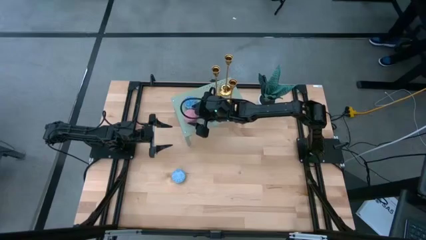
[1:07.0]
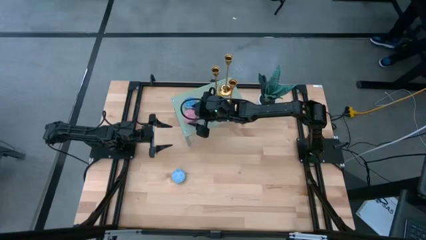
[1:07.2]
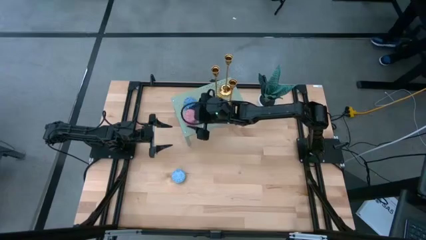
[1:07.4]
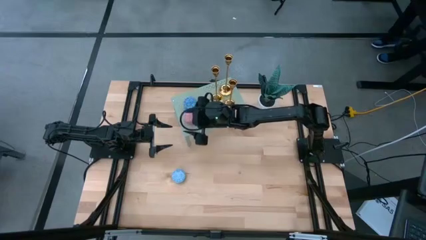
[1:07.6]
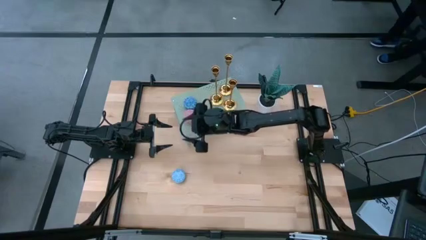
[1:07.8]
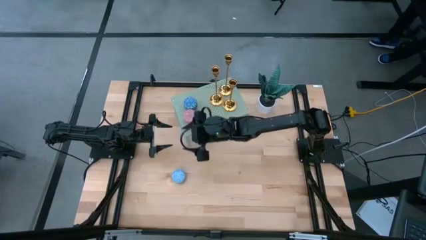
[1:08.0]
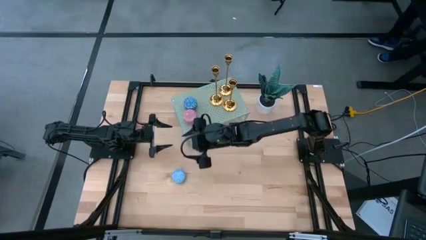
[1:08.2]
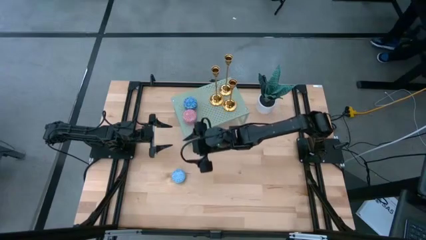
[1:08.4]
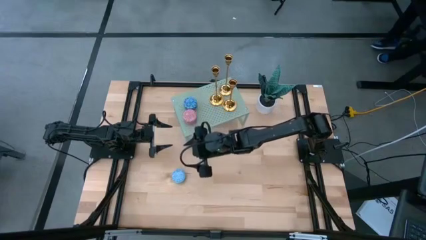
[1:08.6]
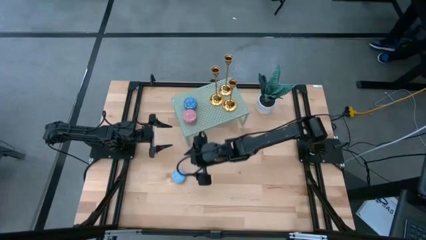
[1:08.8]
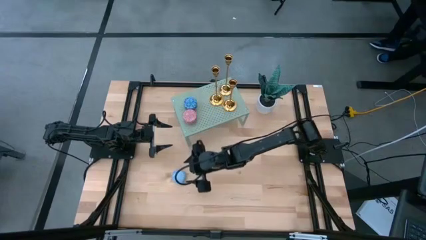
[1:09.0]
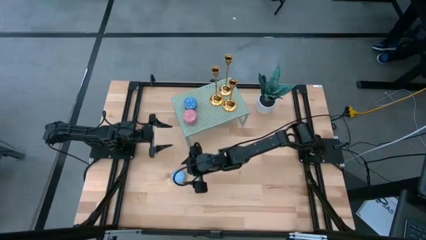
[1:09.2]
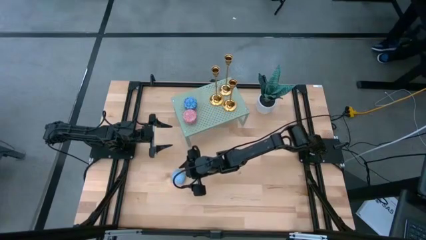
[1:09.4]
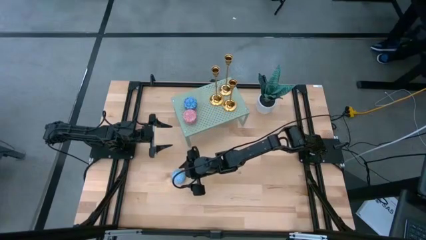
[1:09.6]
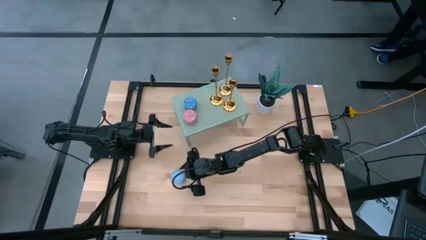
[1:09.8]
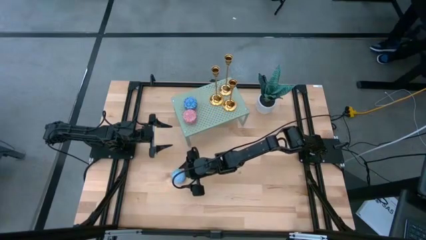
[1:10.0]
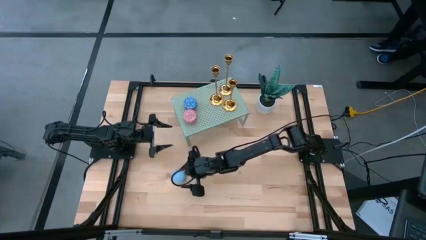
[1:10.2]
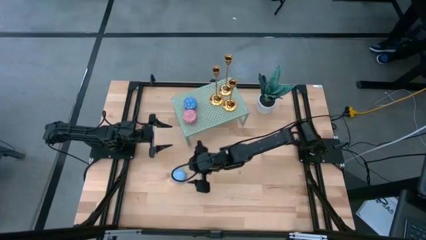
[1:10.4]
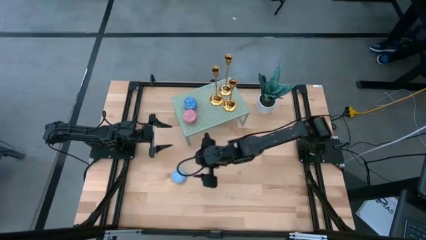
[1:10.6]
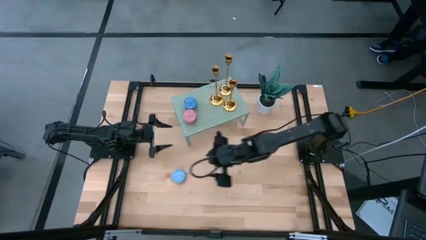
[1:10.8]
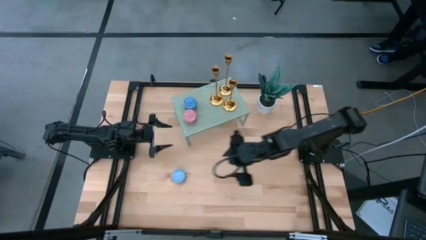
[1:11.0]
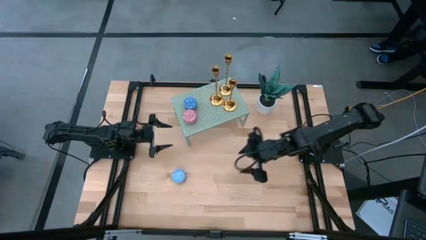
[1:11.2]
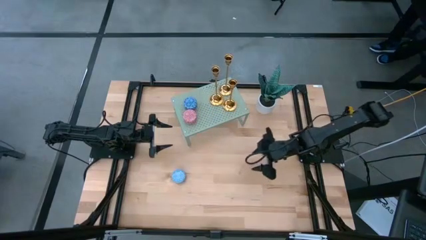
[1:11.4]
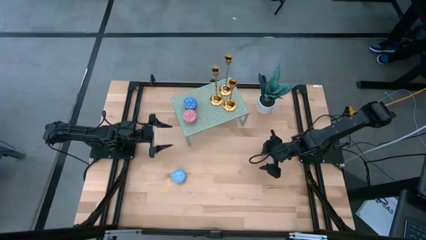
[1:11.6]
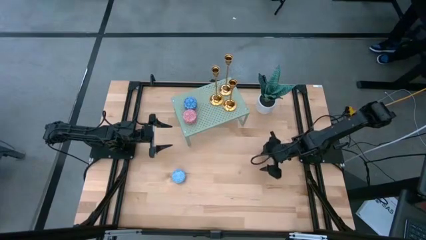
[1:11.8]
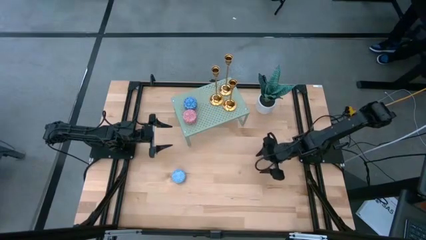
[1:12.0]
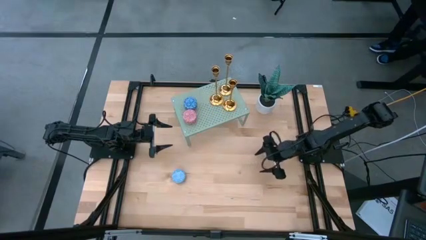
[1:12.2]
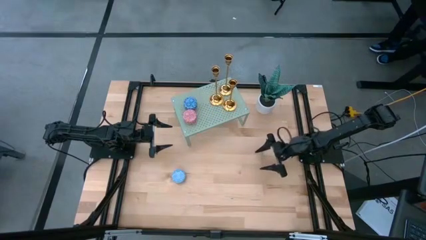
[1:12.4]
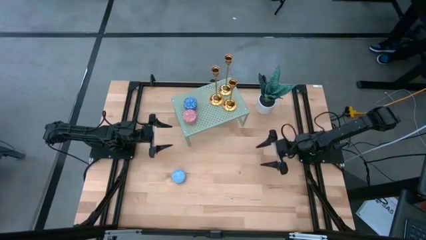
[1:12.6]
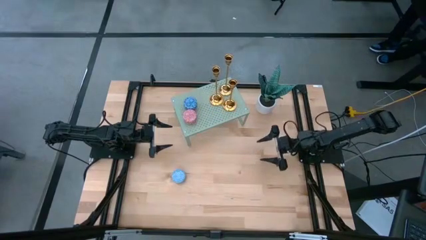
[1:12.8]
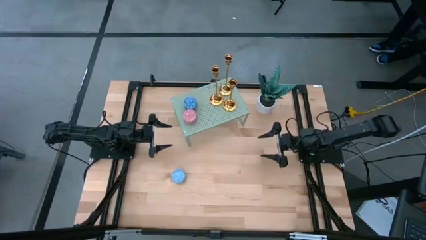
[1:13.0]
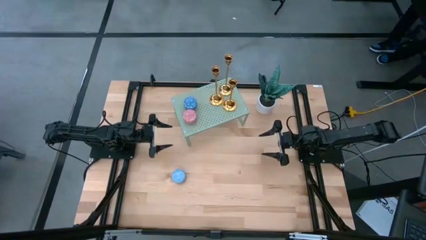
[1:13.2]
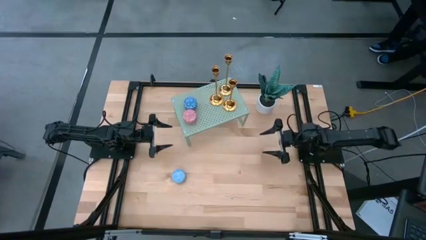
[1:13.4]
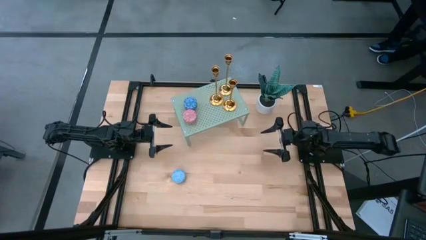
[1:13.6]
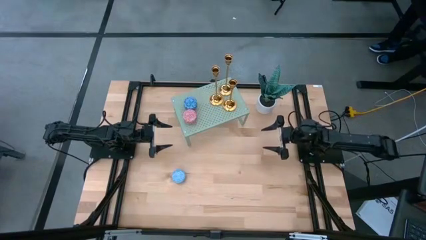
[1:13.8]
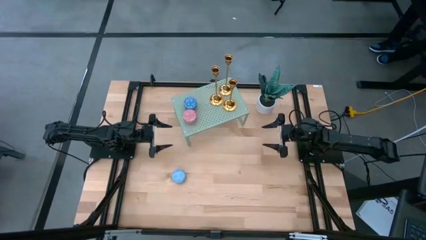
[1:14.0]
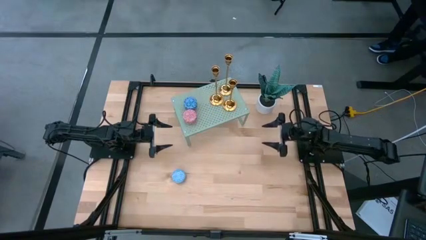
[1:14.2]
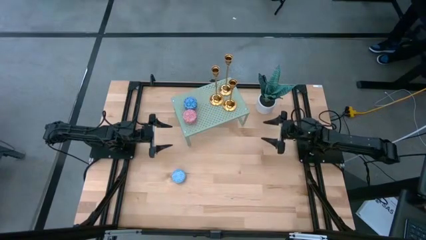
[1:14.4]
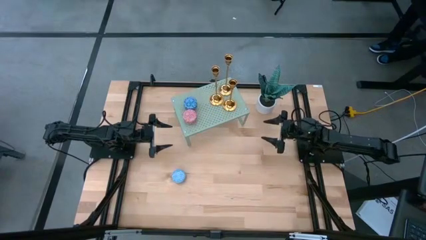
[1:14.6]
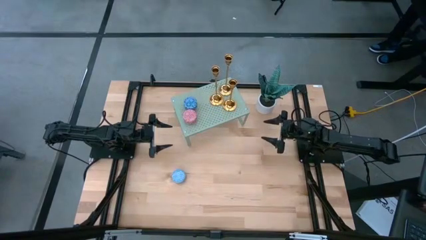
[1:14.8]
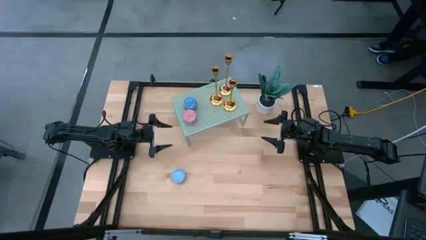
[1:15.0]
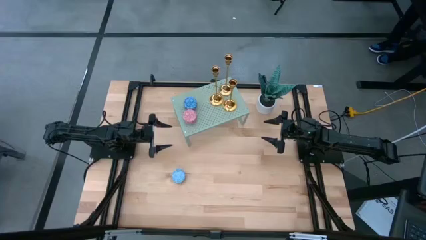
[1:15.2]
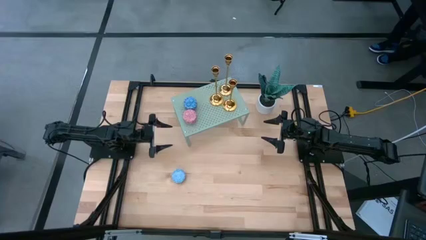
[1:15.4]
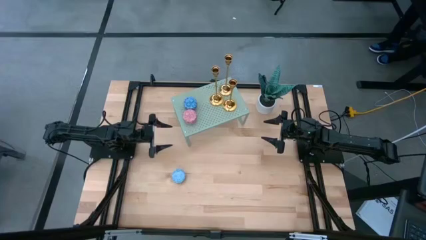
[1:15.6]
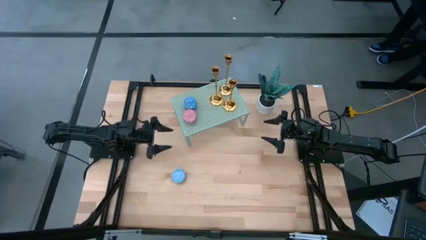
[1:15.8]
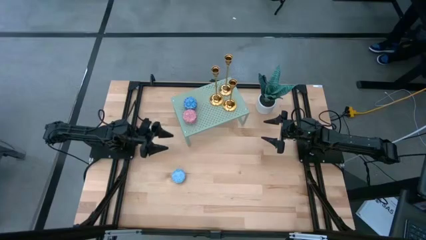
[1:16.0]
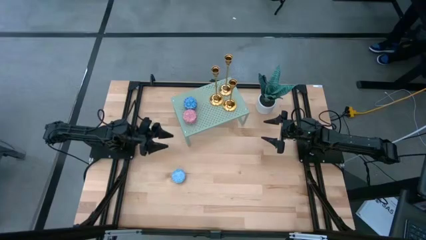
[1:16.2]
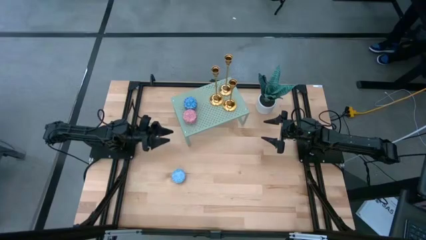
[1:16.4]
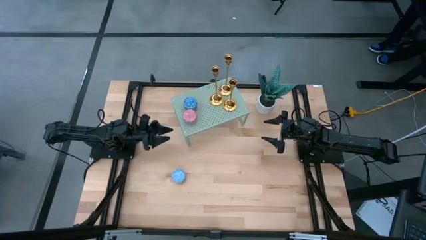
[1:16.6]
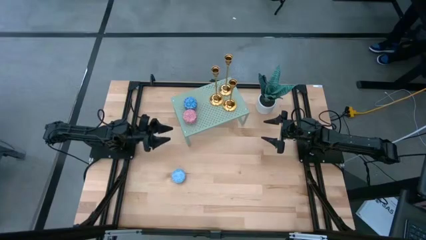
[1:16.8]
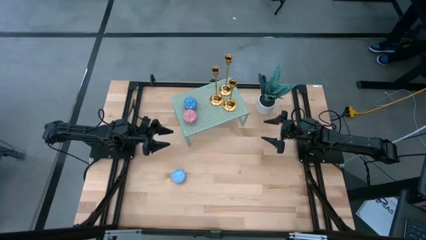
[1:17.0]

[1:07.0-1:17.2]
Task: Pick & Place candle stick holders
Put the light blue scented candle on the shelf

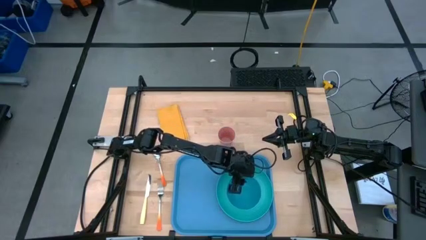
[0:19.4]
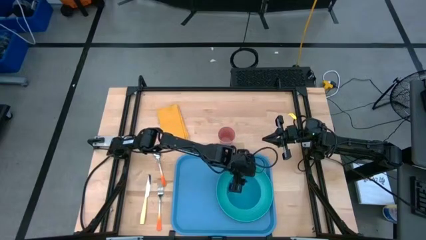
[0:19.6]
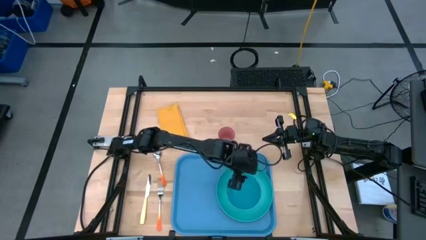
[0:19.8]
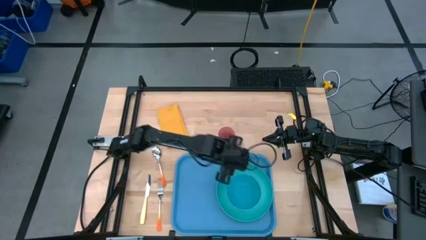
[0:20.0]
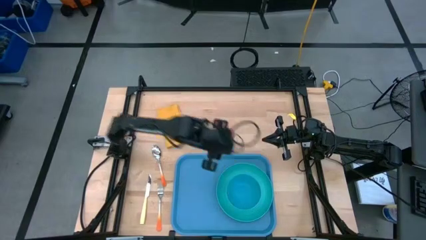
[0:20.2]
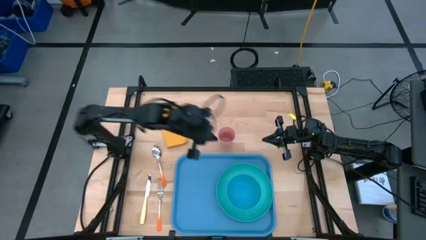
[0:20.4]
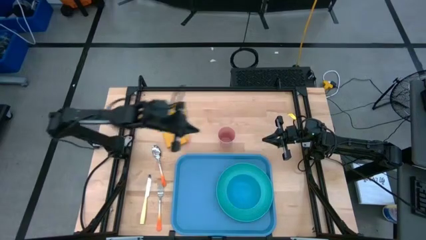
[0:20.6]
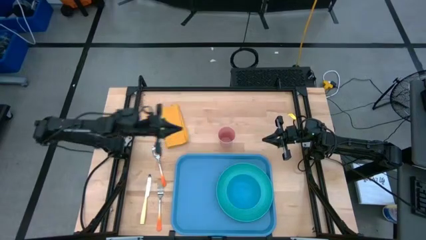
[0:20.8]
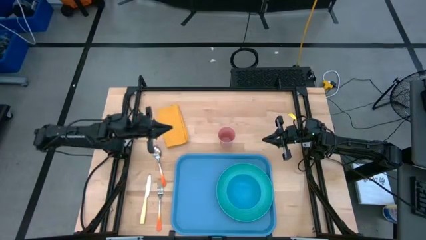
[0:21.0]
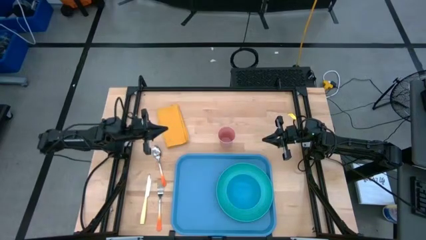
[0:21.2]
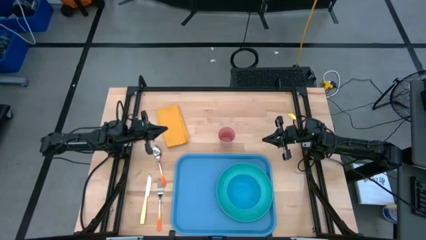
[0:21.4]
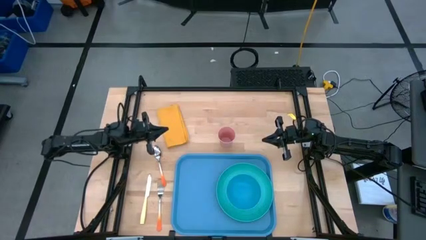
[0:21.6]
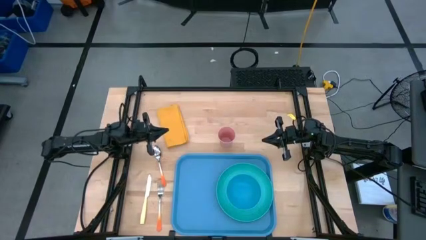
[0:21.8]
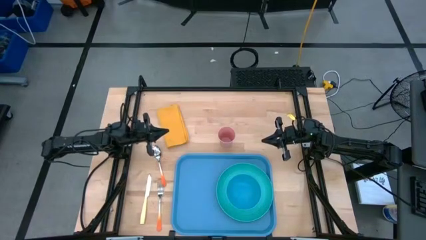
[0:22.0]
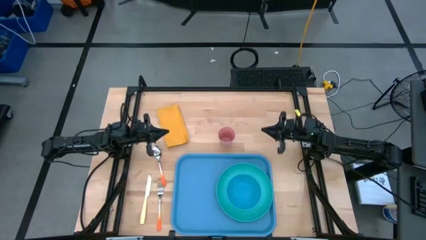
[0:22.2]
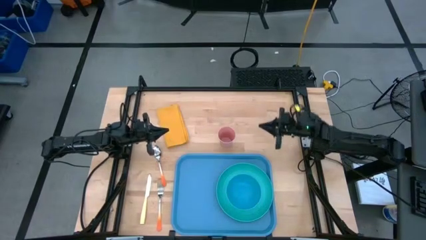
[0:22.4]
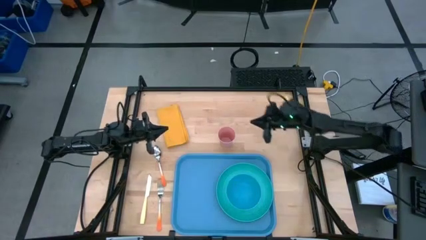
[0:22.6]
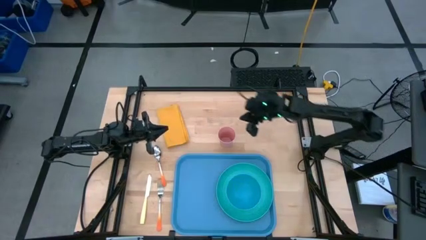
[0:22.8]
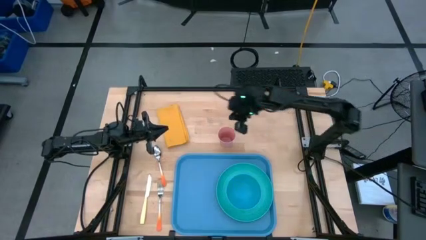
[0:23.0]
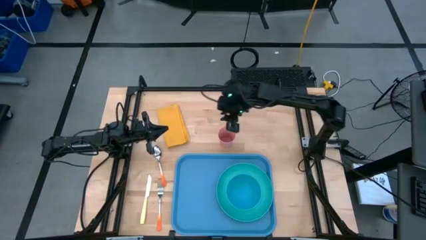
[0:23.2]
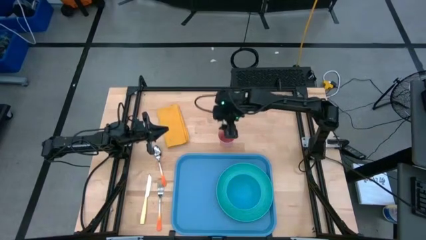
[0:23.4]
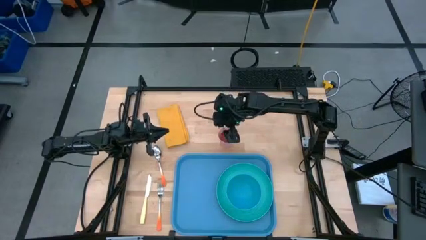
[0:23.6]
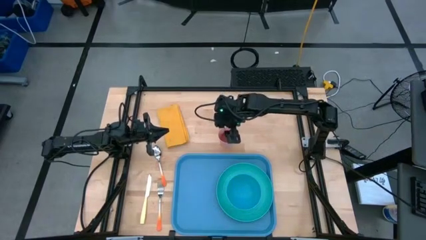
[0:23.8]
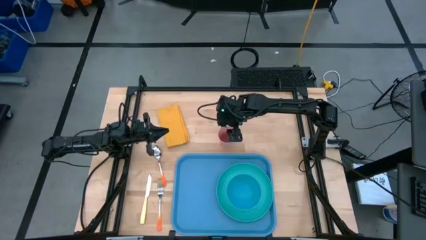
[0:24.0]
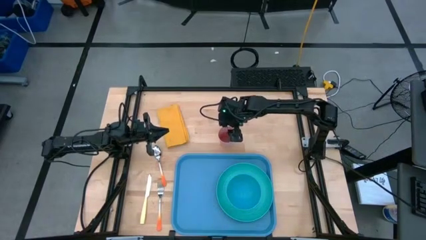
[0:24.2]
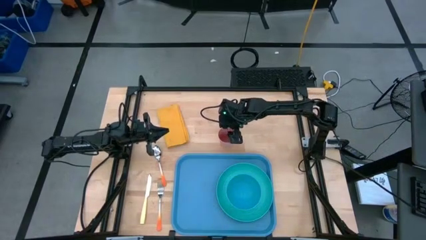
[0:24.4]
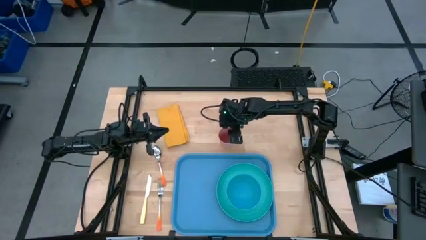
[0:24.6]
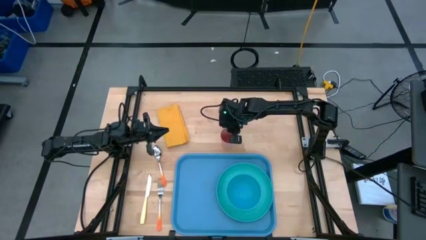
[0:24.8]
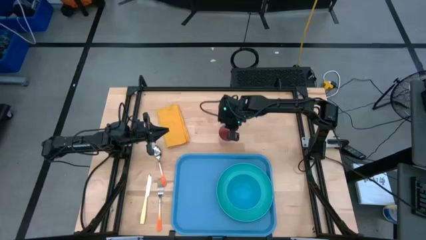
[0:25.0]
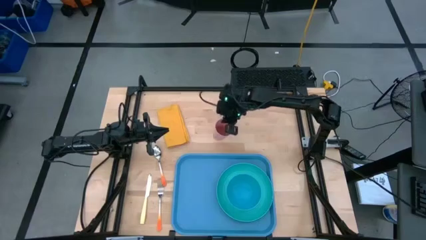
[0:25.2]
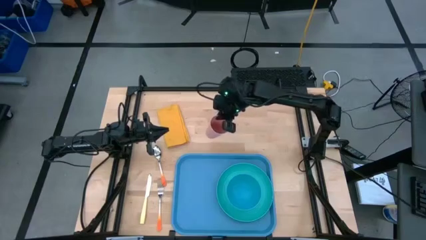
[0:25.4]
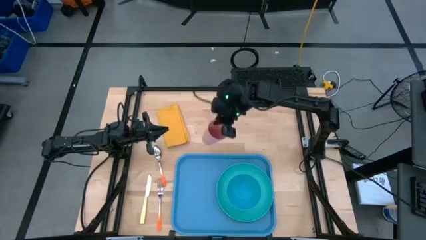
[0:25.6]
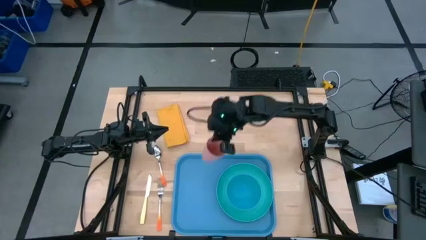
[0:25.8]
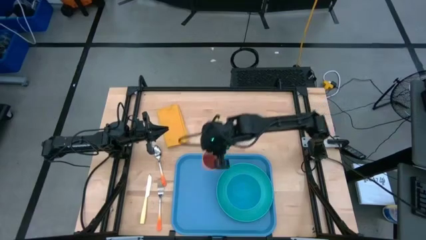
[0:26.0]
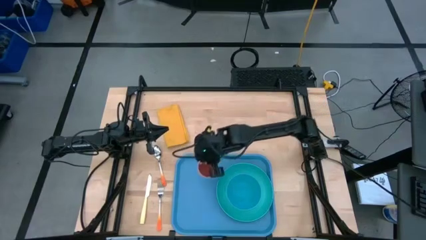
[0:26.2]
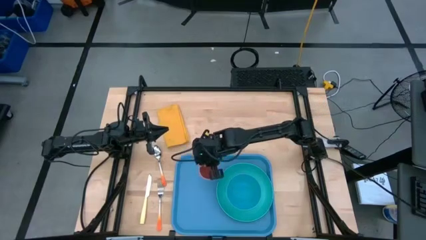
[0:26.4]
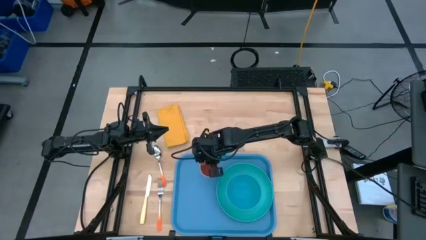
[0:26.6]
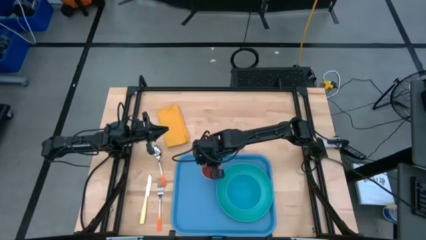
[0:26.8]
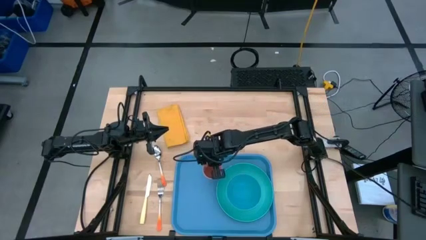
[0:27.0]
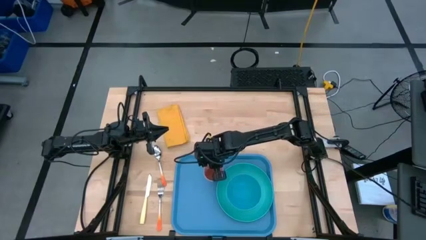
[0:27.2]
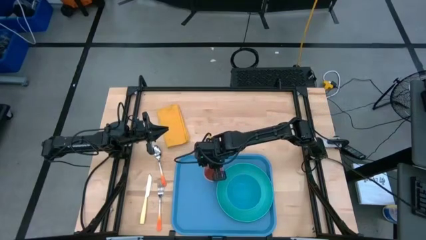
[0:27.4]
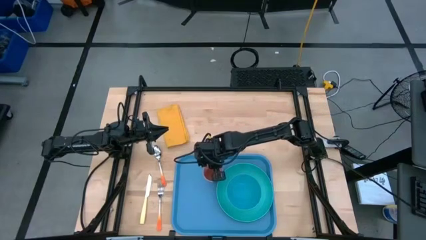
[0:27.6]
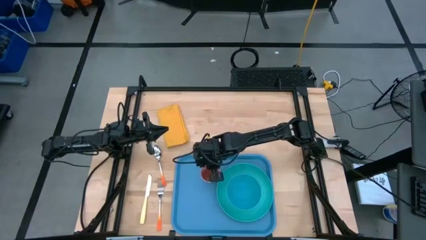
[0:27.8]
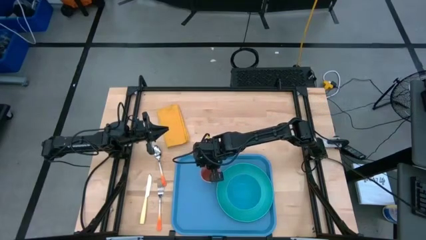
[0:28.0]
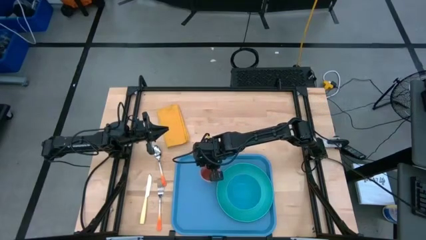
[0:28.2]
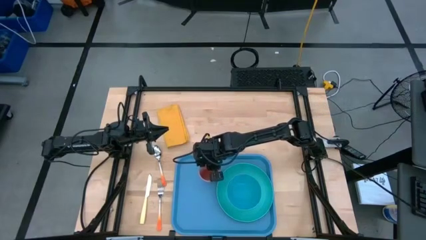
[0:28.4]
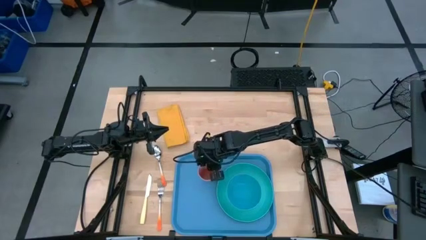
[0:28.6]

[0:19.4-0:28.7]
Task: Set up tray
Put the pink cup on the blue serving tray to the top of the blue plate
